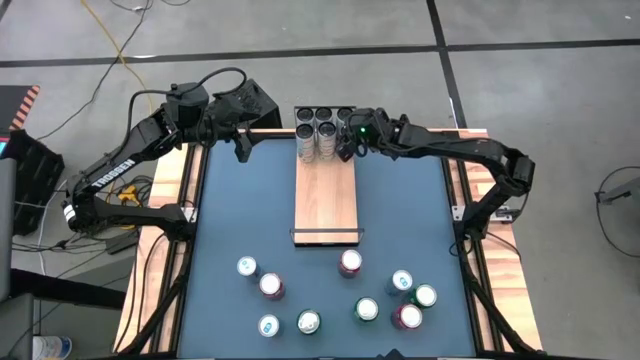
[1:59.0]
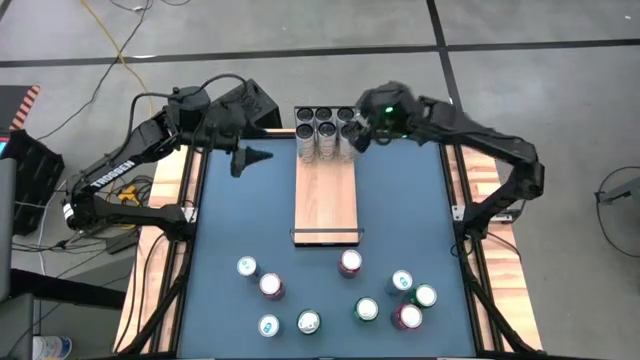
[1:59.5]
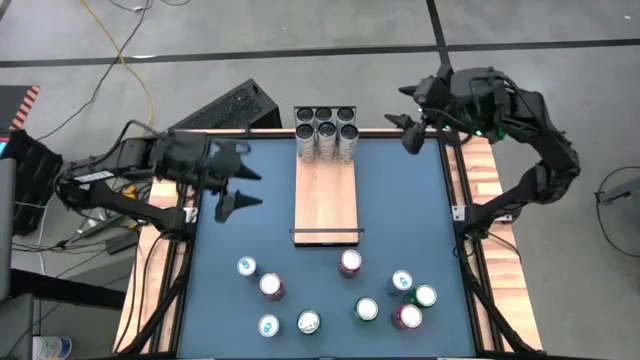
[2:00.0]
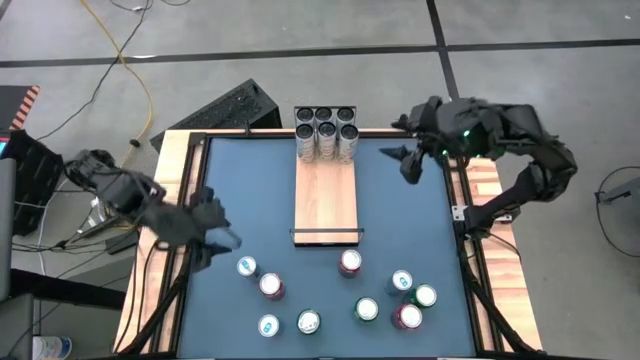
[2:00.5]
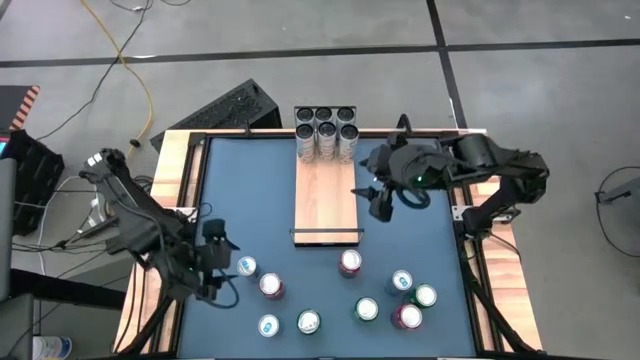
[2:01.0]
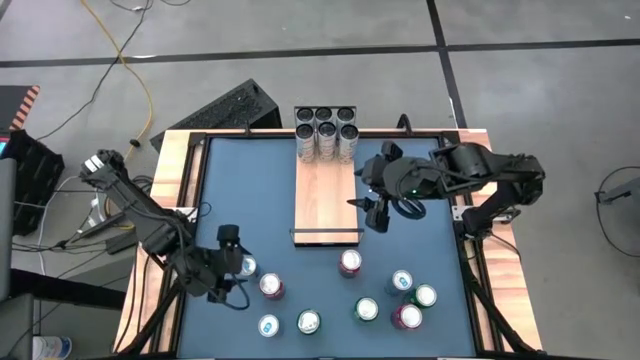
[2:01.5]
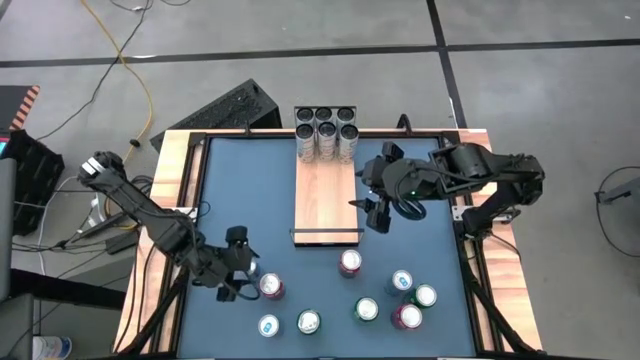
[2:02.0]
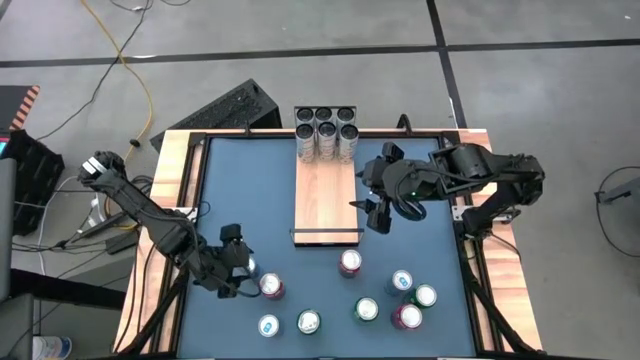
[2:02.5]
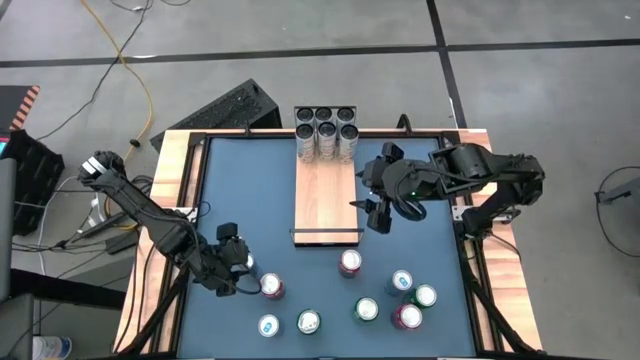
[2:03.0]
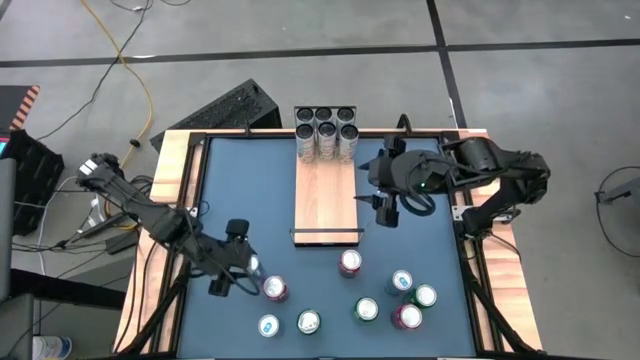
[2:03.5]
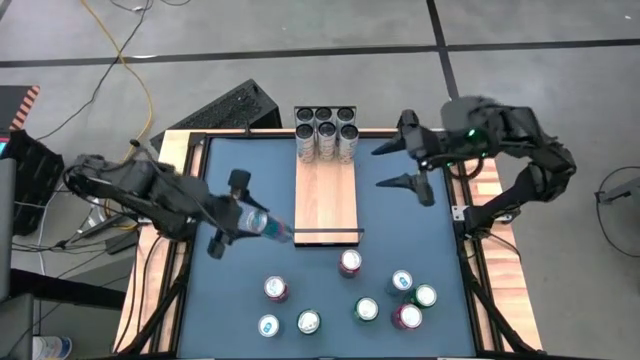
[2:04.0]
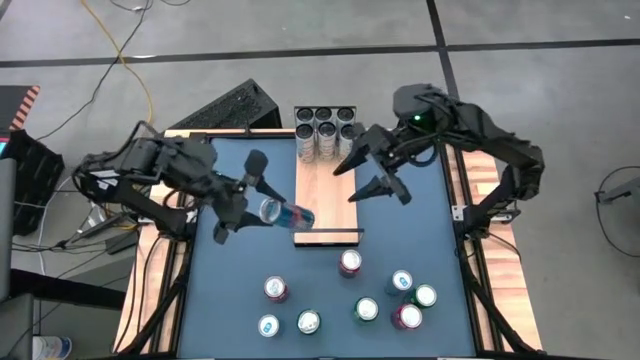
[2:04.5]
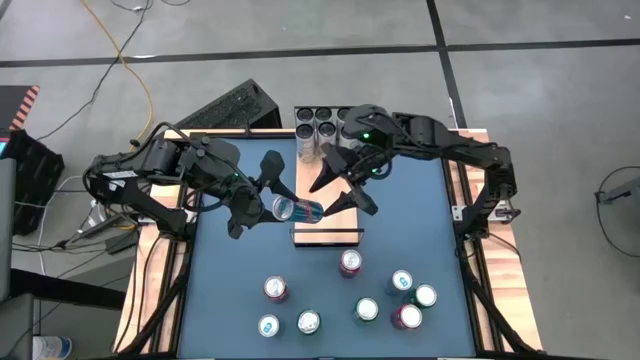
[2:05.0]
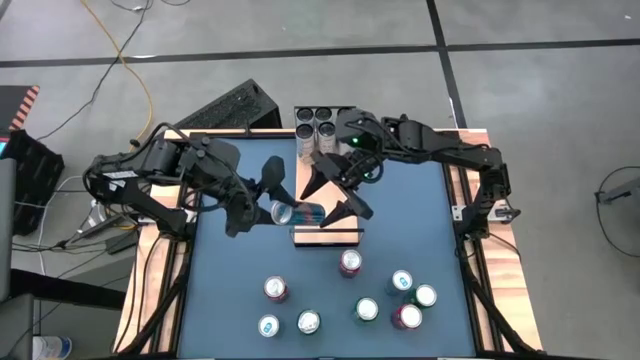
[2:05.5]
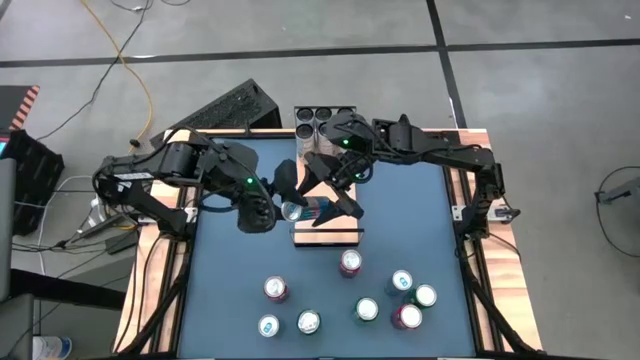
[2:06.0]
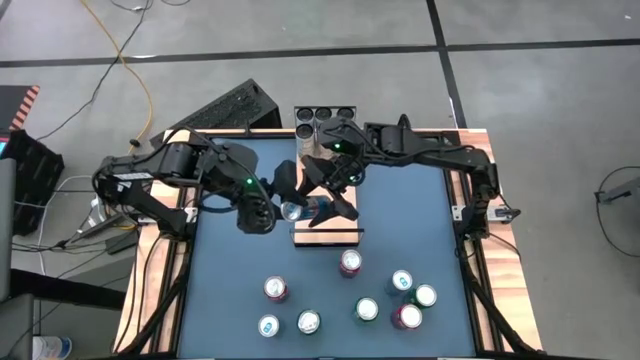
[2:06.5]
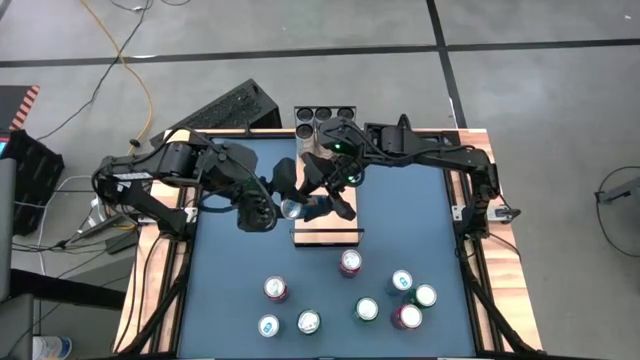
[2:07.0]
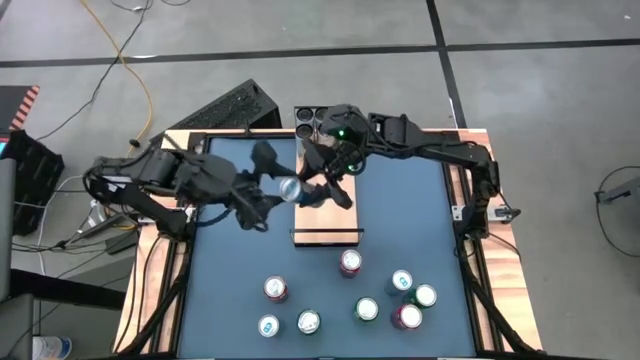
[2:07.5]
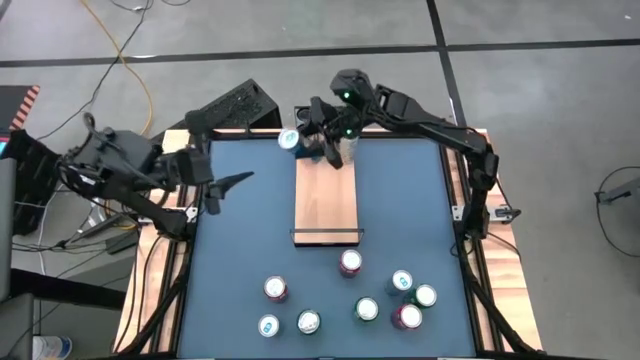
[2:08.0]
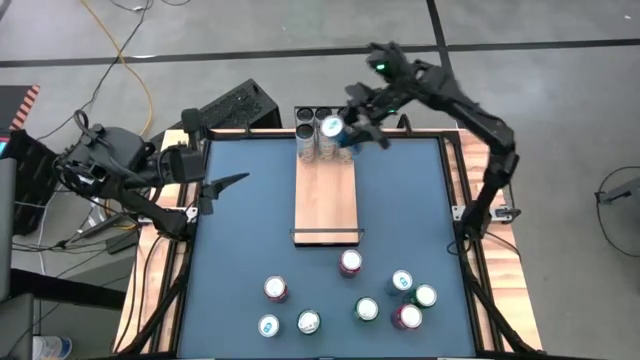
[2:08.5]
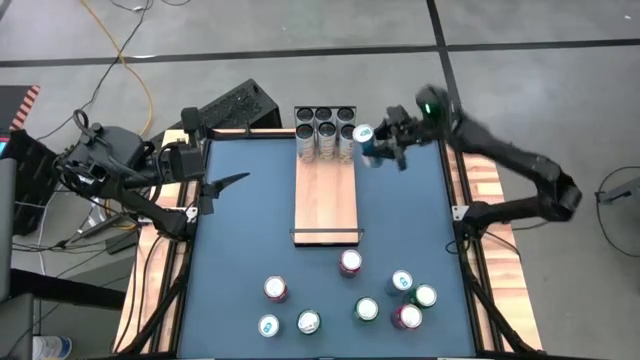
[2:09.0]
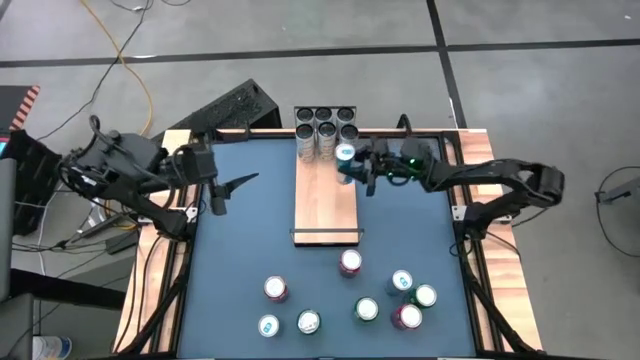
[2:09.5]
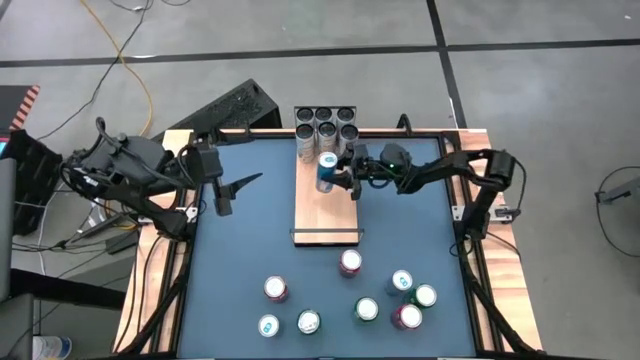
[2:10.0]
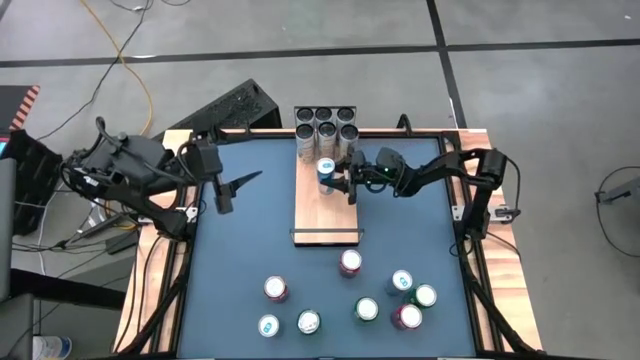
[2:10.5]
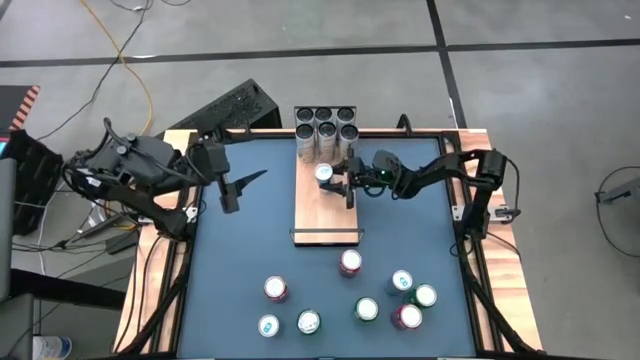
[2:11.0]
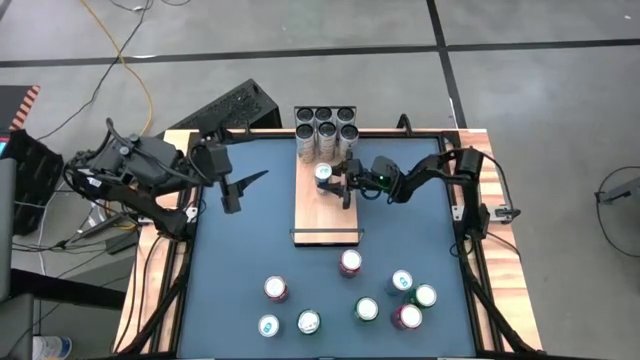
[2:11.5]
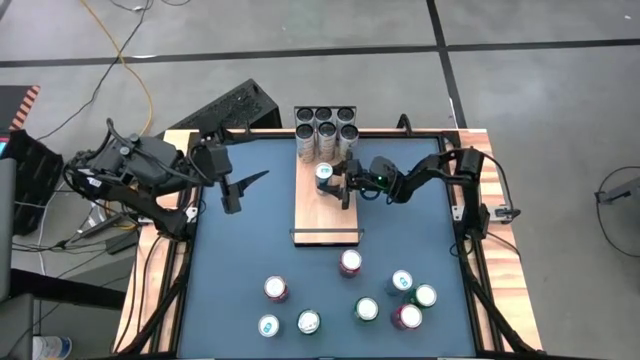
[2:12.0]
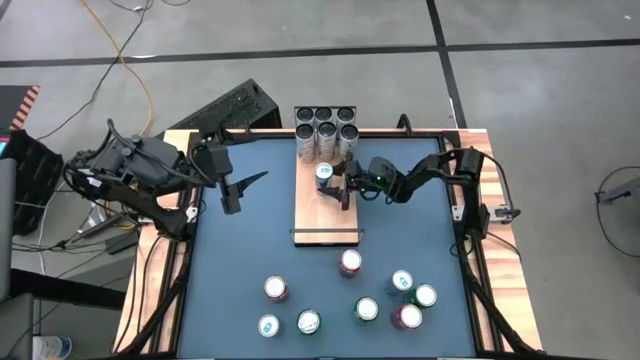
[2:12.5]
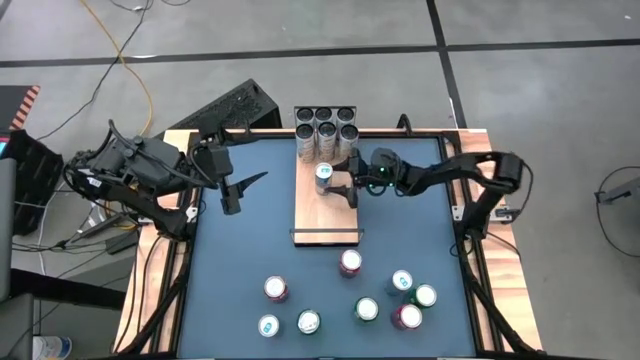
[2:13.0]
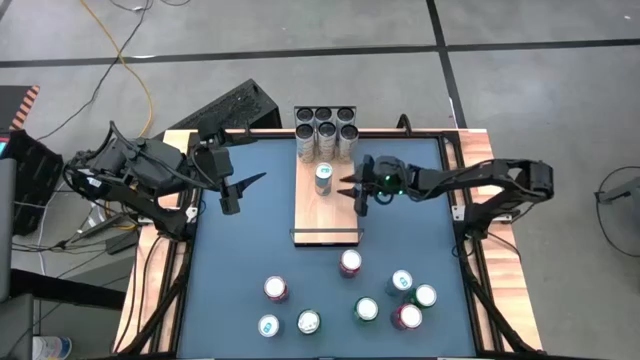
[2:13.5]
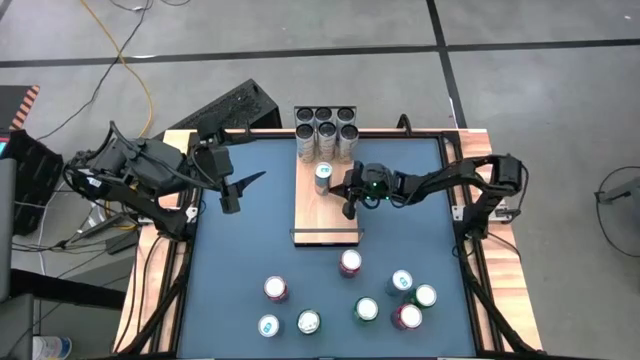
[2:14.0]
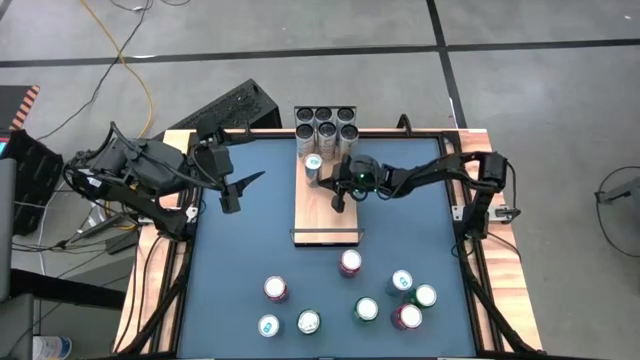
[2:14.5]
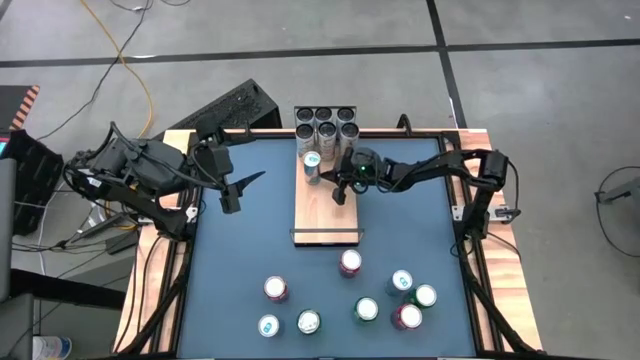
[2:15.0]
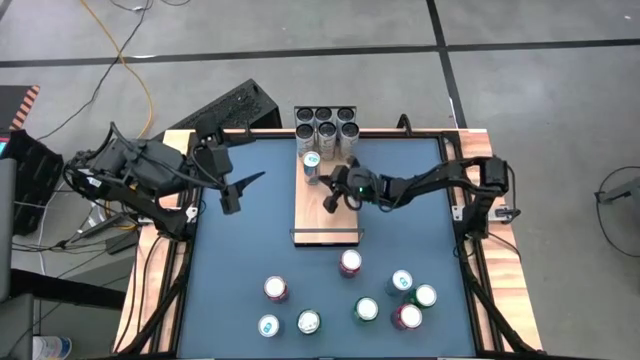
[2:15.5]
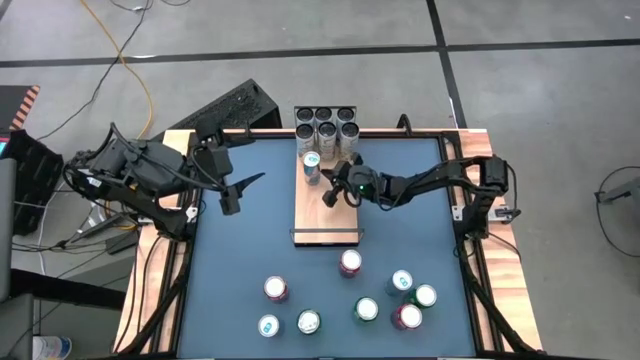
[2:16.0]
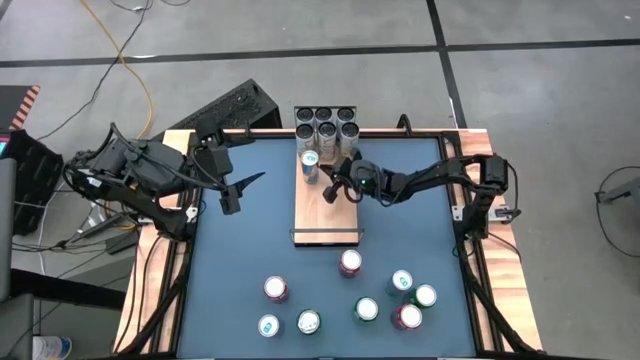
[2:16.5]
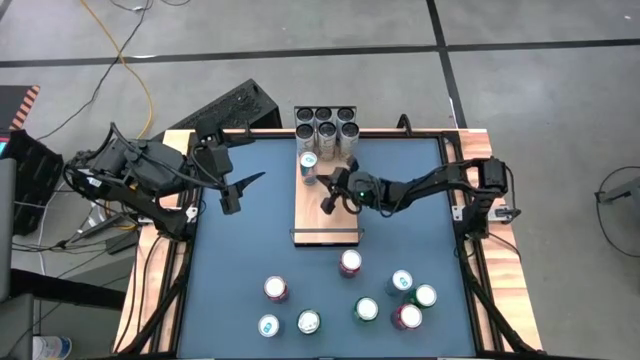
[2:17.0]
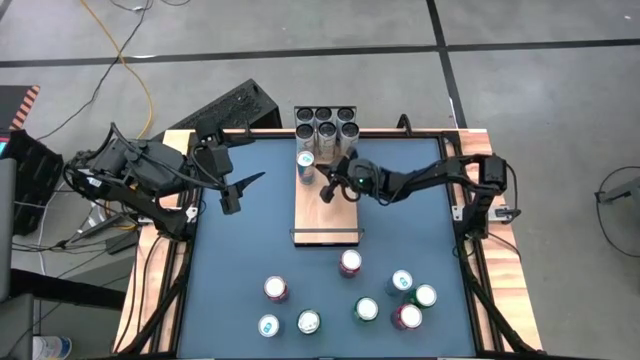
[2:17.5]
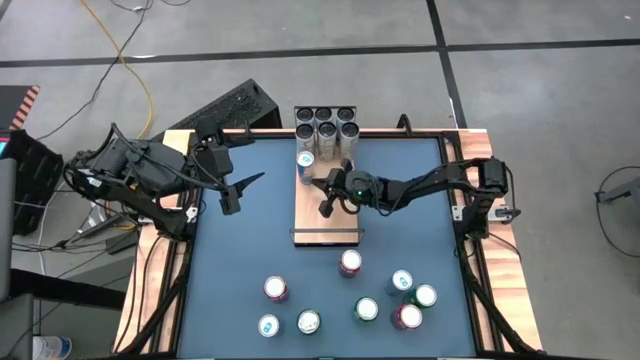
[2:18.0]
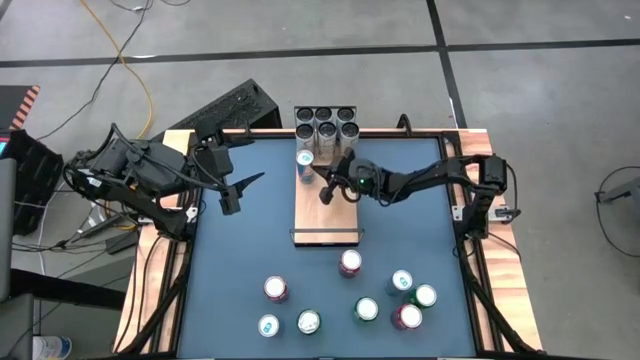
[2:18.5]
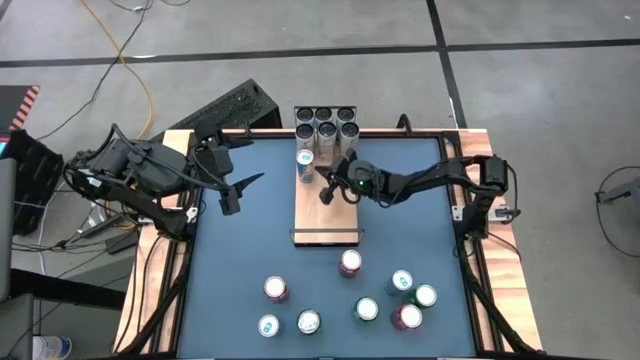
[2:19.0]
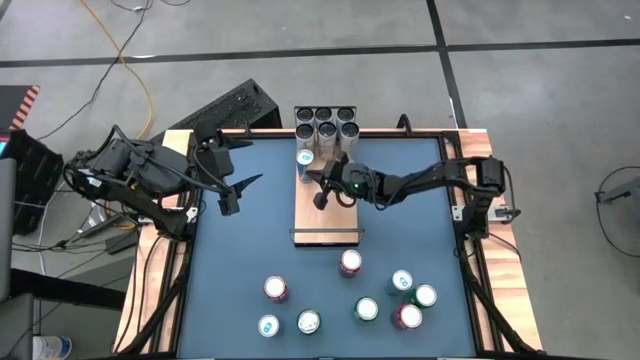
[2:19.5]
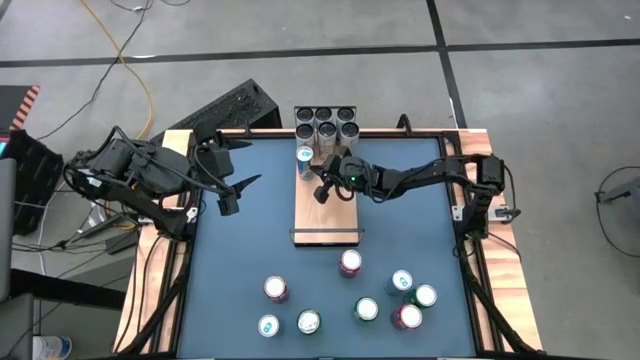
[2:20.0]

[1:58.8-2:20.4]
Task: Place canned beverage on shelf
Put the top left blue soda can on the shelf
